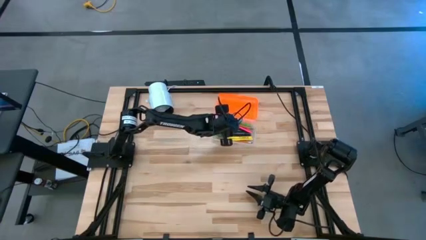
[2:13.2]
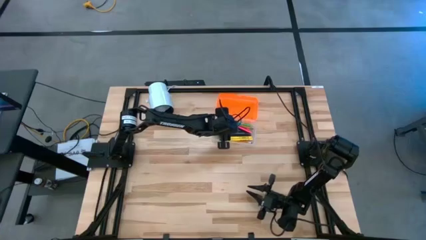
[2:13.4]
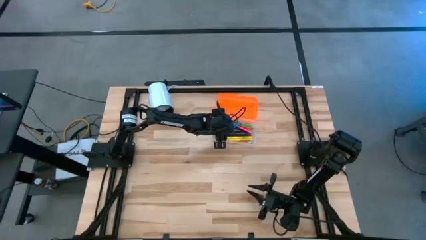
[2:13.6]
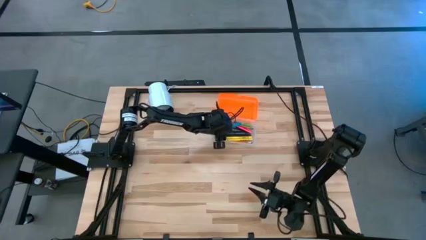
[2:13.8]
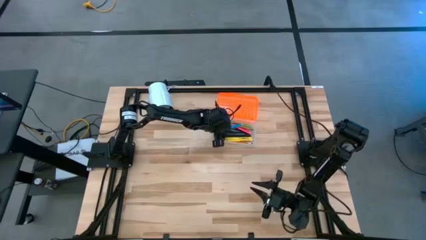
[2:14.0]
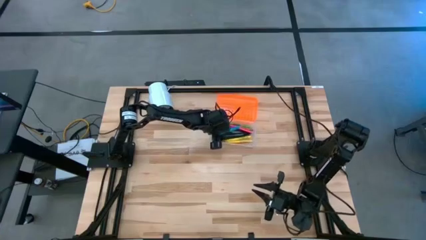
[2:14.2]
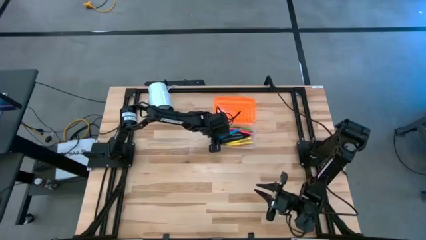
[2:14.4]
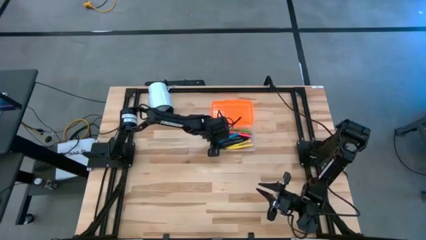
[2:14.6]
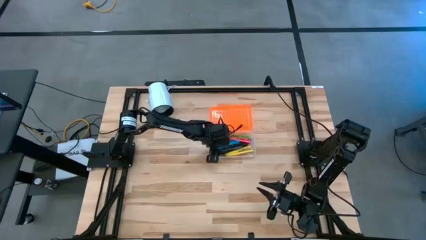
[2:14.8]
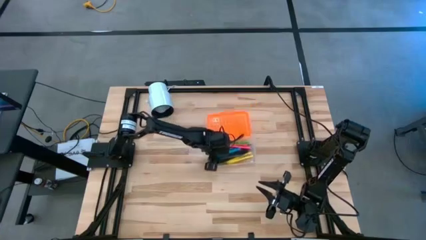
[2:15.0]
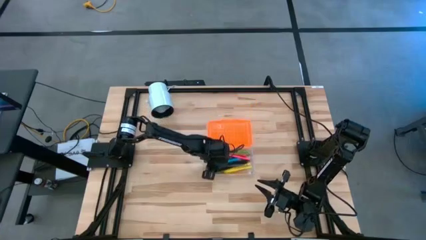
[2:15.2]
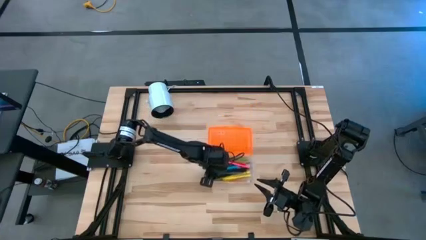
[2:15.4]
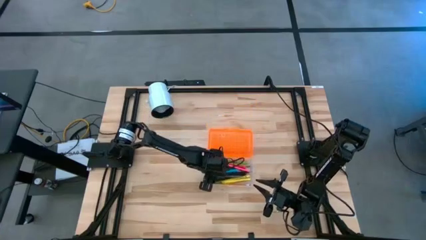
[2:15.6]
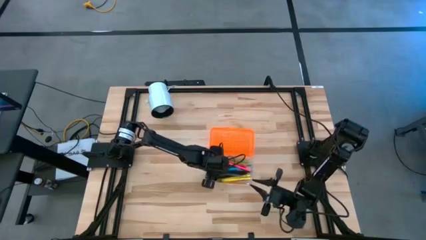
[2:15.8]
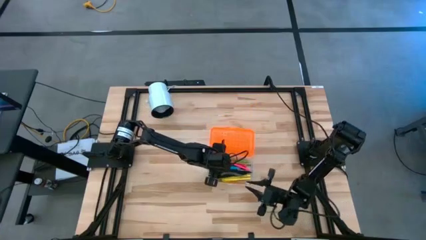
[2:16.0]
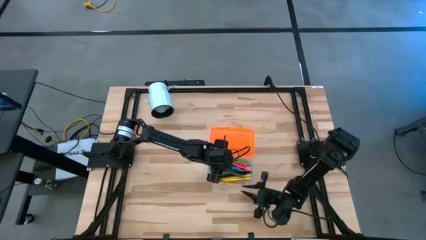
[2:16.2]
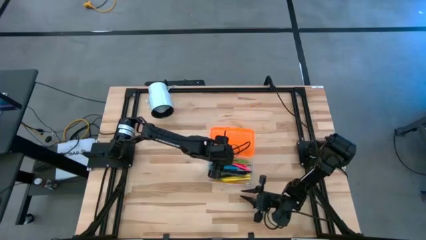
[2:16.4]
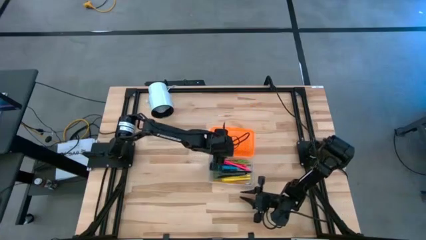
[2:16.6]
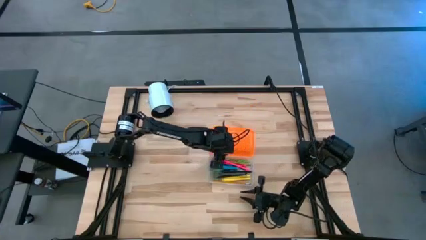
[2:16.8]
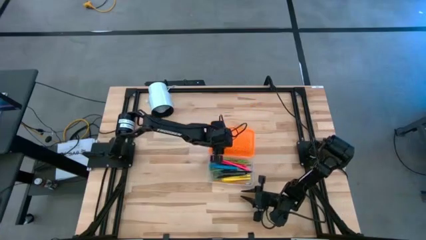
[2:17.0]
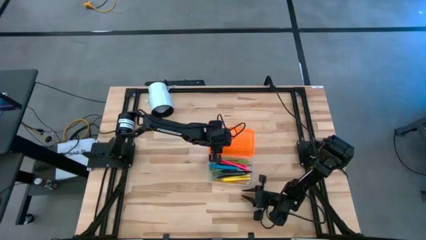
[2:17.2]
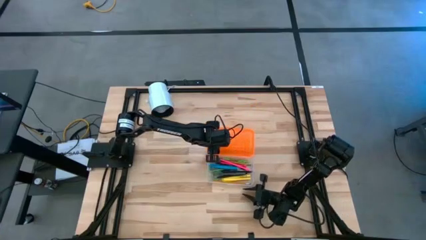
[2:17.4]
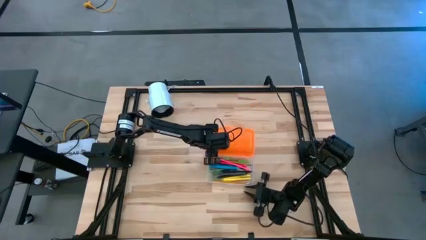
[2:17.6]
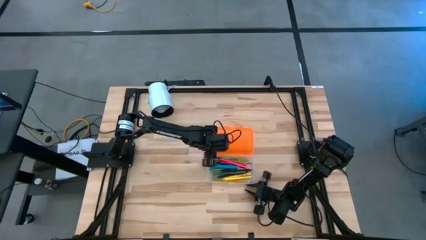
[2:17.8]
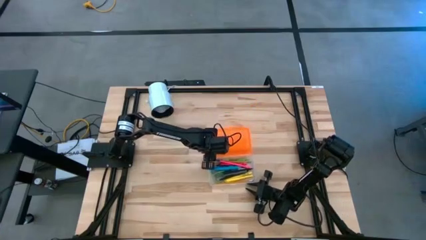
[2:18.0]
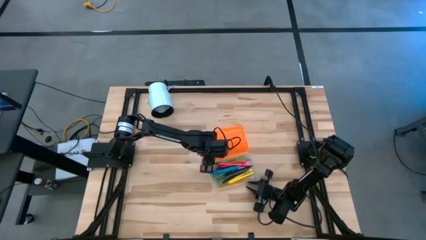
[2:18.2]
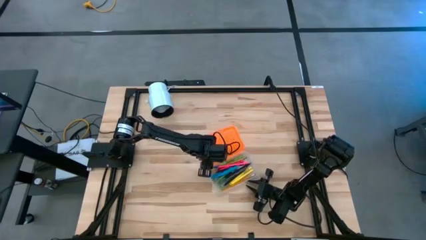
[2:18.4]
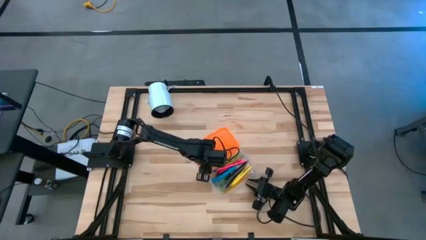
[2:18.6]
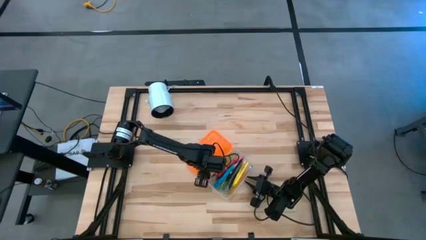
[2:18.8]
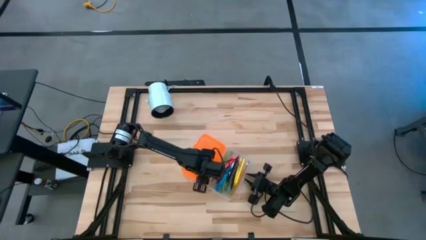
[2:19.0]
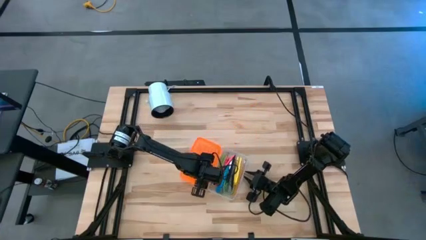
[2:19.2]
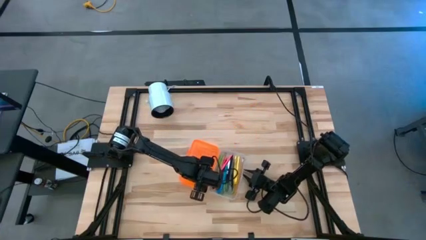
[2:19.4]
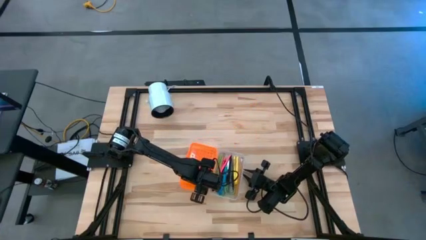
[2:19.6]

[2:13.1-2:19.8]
Task: Pick & place school supplies into a supply box
Move the supply box to the center of the table

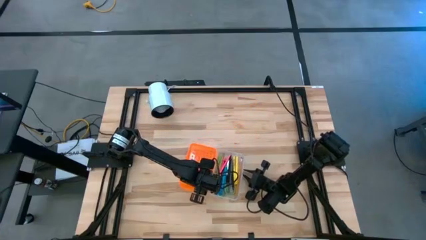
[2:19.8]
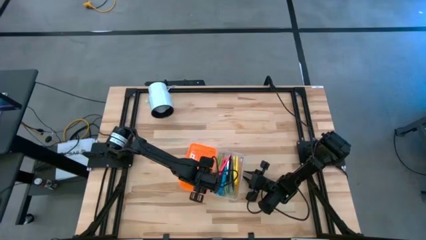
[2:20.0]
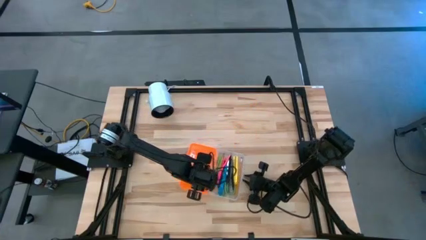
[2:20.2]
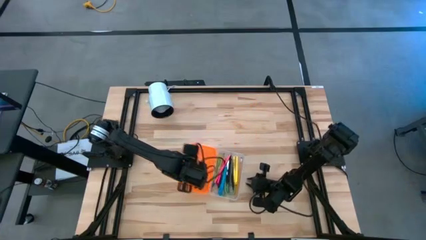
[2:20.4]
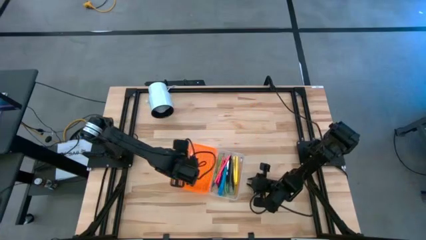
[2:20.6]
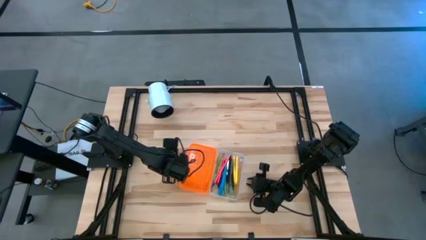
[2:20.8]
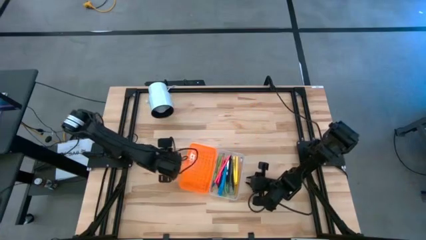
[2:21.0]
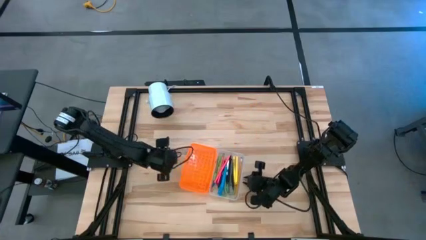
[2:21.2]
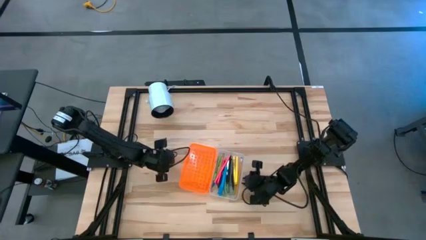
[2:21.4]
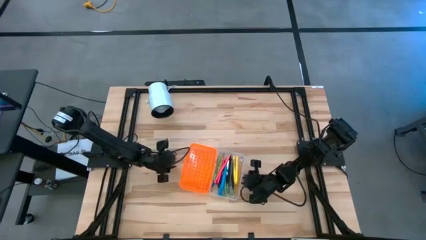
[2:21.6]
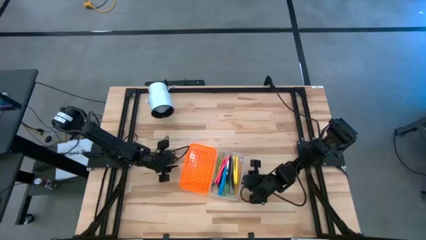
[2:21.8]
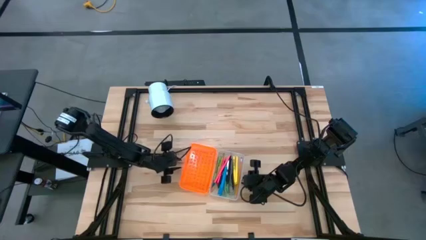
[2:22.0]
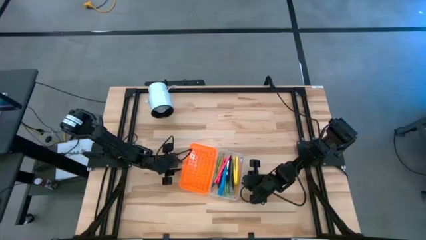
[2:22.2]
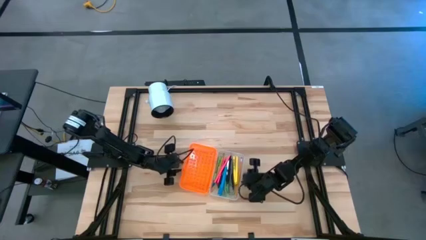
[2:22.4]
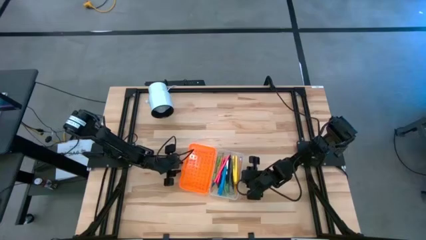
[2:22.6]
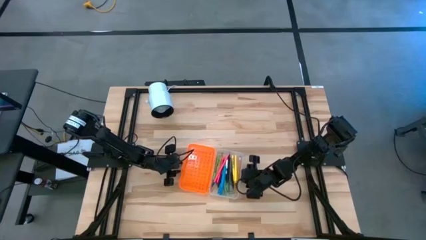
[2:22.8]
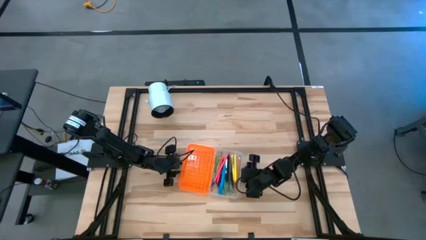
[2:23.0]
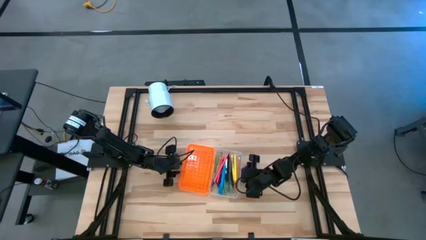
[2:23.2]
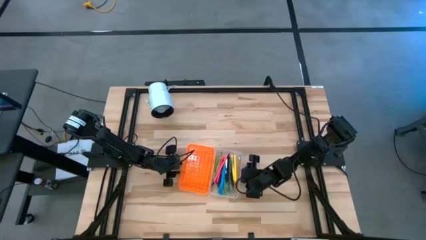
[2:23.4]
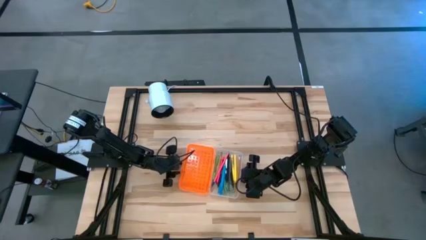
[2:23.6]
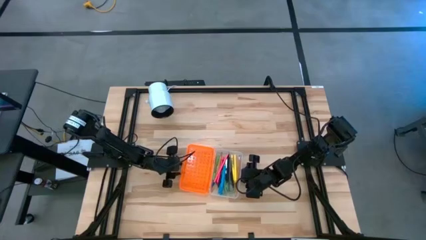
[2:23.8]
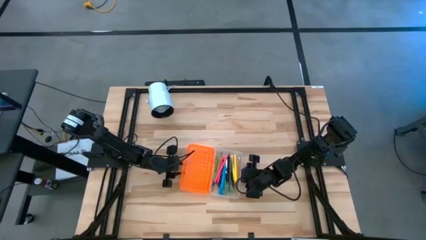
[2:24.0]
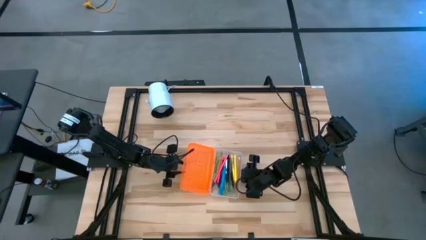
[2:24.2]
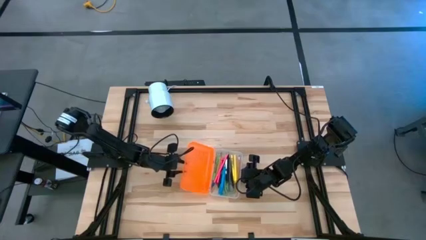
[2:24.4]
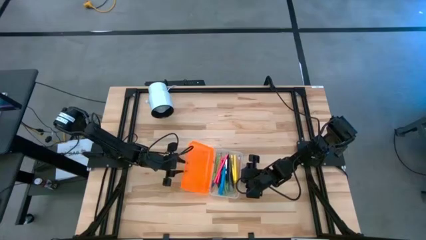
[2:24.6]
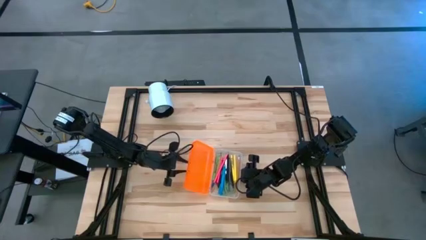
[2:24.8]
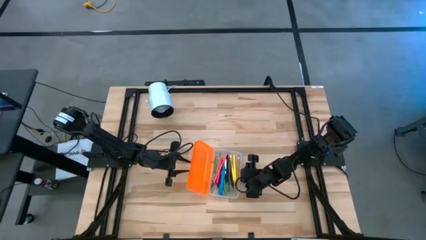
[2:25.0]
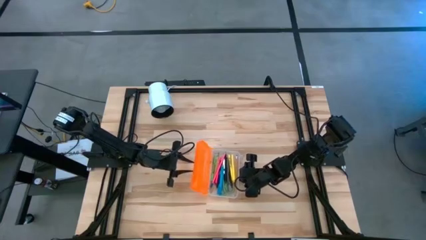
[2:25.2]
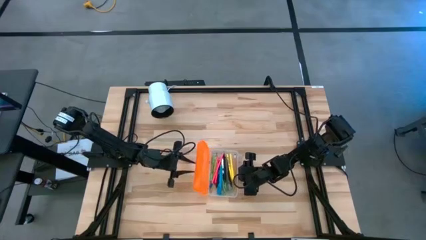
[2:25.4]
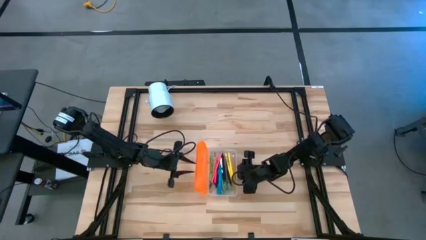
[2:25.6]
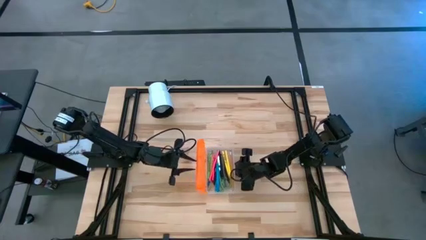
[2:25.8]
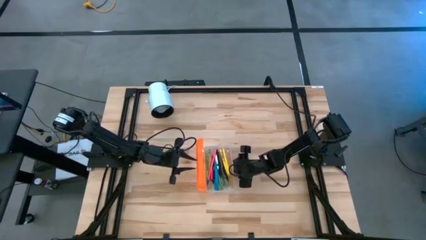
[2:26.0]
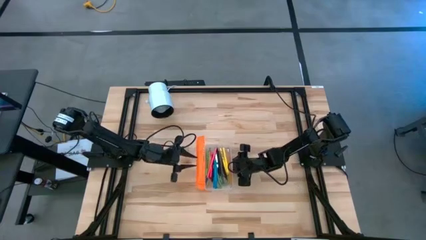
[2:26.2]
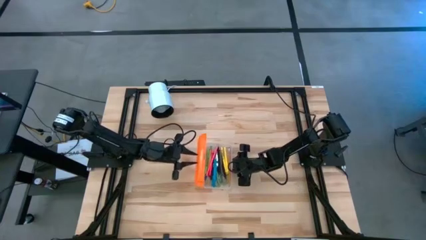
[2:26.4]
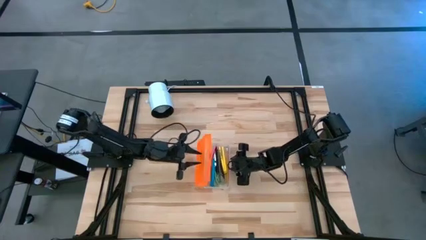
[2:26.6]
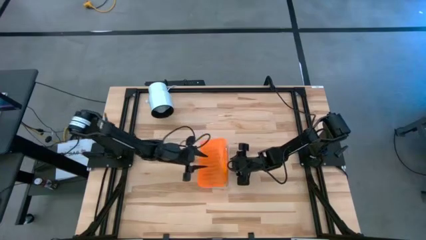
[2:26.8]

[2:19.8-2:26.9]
Close the supply box

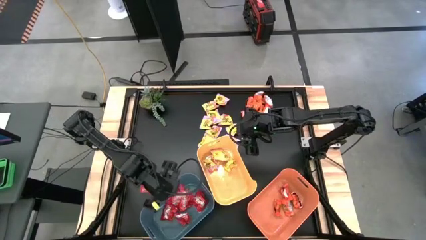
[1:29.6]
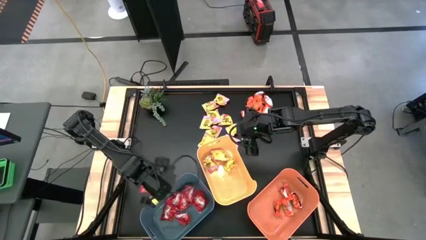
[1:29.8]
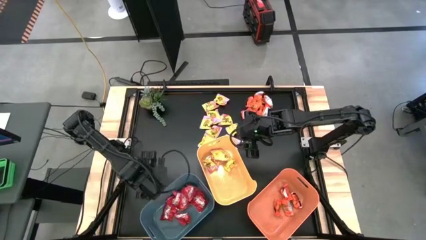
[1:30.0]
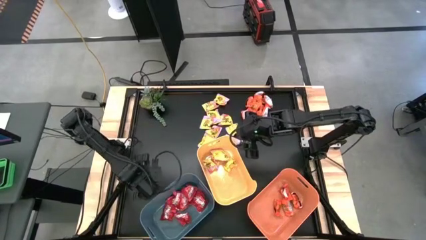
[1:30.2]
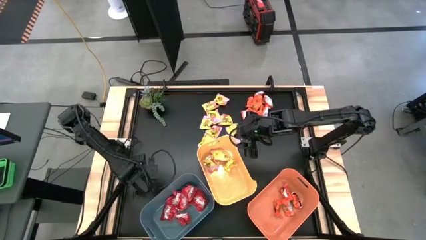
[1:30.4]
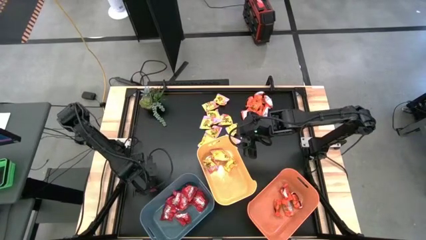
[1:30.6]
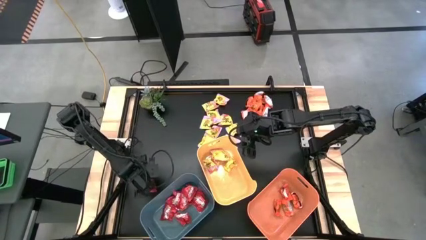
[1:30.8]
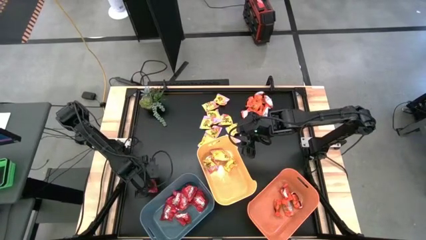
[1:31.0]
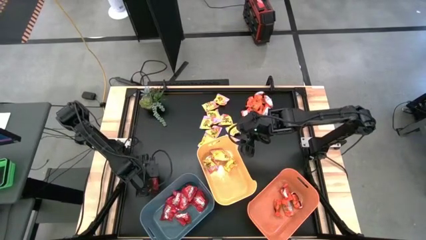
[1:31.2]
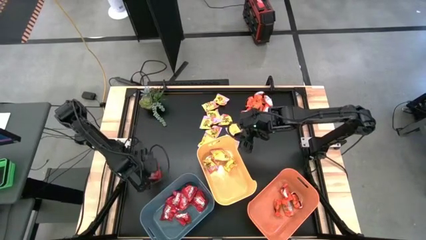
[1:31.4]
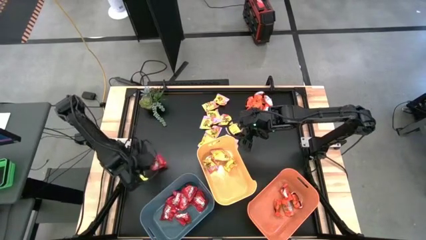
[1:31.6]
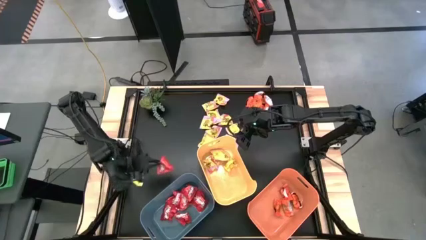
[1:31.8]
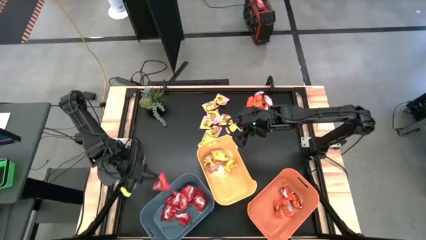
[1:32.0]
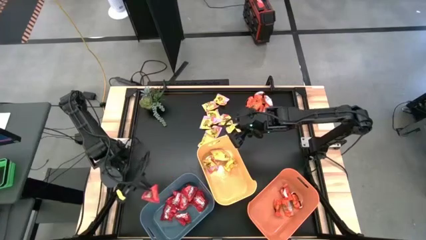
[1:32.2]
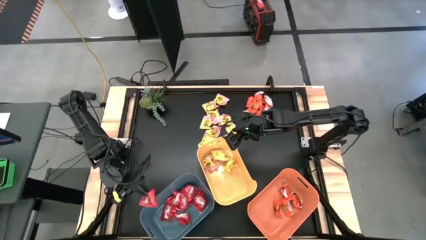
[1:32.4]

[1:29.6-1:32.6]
Task: Sort candy
Put the red candy into the blue bin
